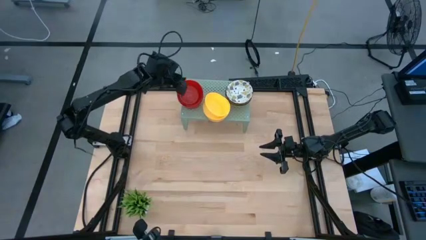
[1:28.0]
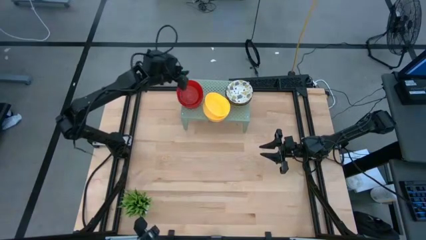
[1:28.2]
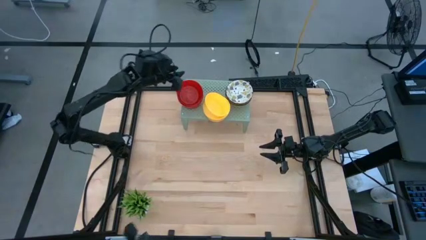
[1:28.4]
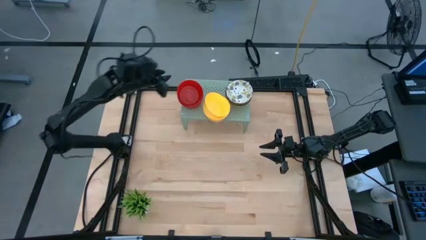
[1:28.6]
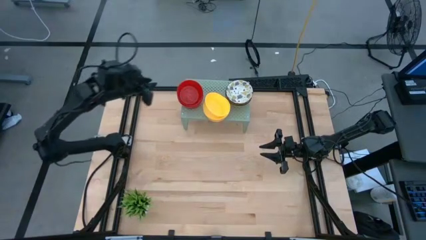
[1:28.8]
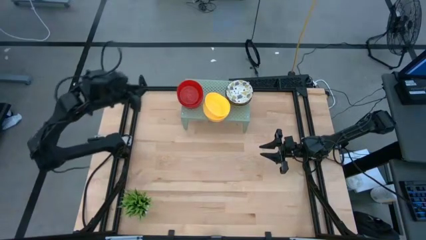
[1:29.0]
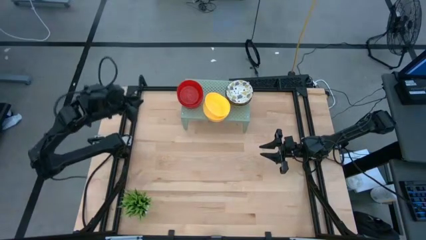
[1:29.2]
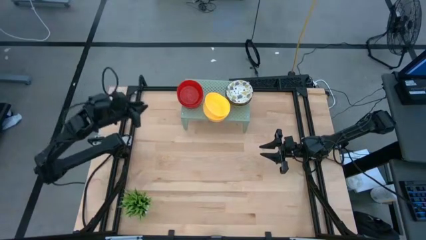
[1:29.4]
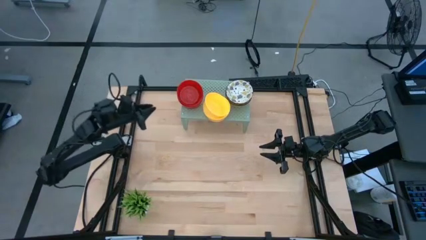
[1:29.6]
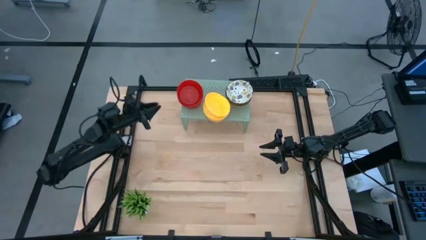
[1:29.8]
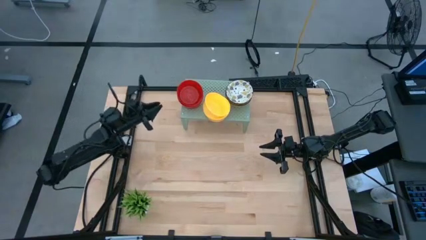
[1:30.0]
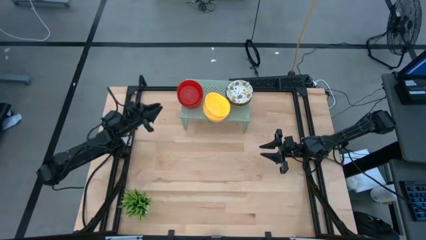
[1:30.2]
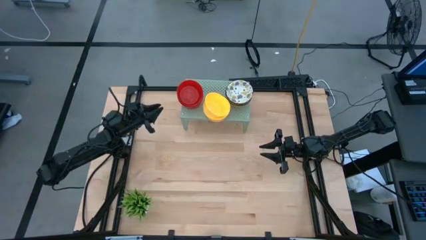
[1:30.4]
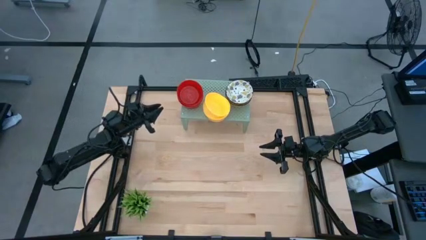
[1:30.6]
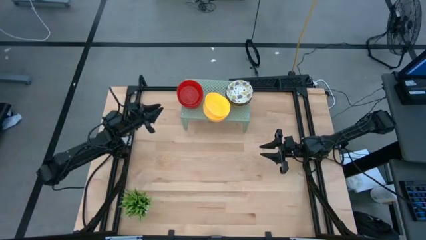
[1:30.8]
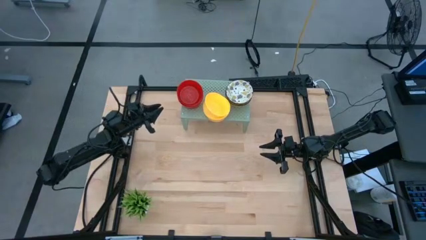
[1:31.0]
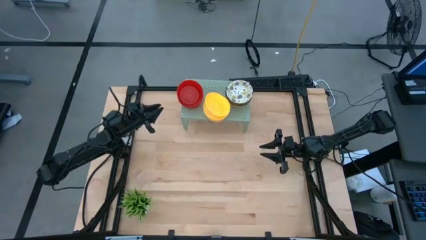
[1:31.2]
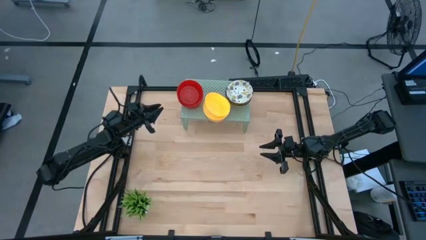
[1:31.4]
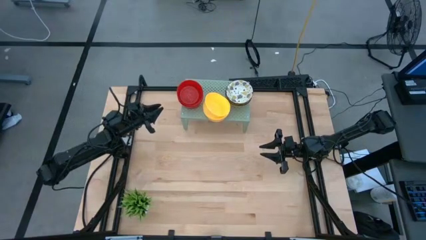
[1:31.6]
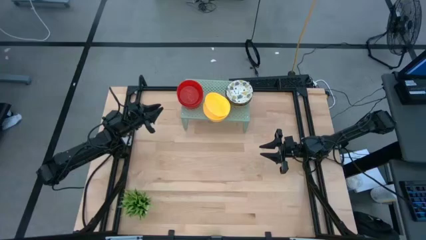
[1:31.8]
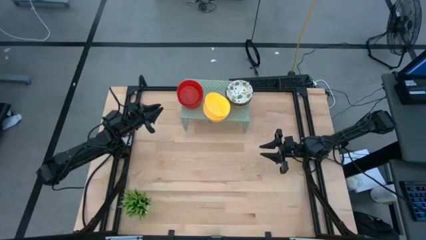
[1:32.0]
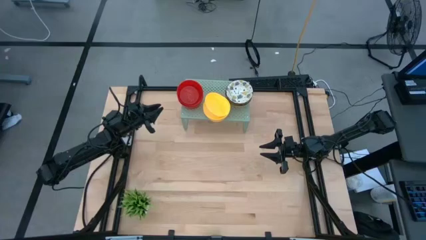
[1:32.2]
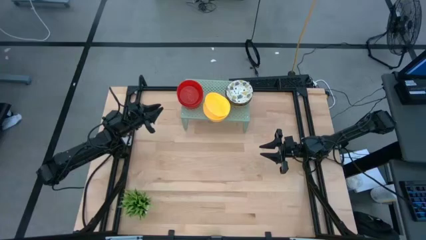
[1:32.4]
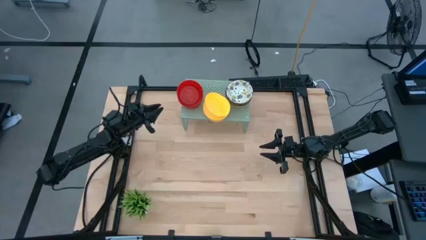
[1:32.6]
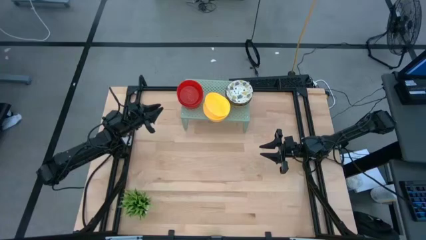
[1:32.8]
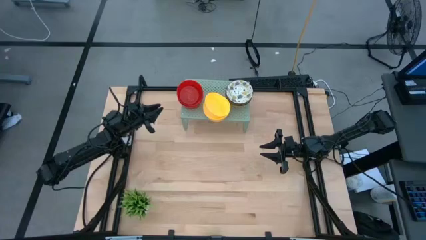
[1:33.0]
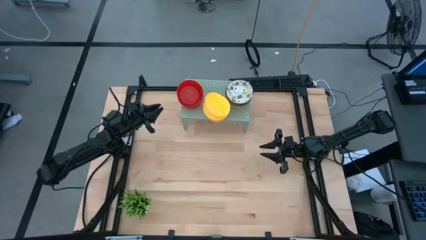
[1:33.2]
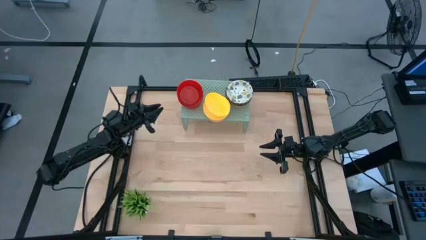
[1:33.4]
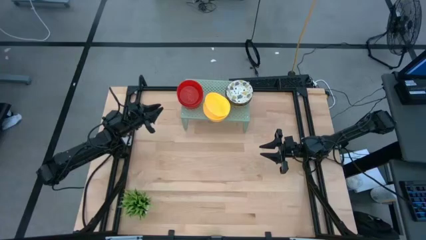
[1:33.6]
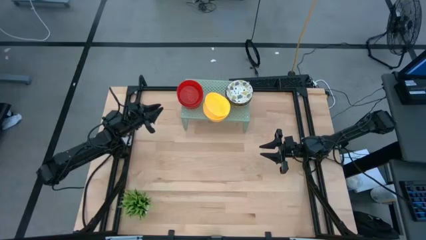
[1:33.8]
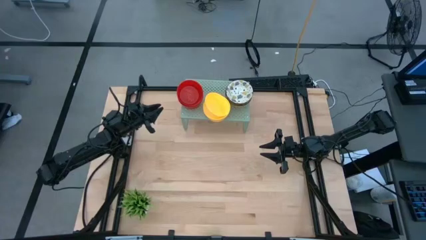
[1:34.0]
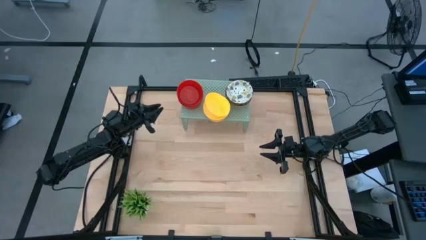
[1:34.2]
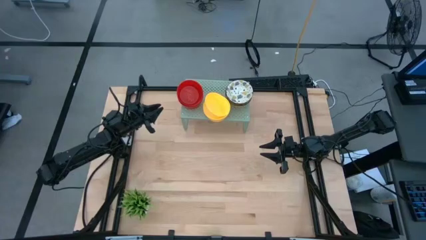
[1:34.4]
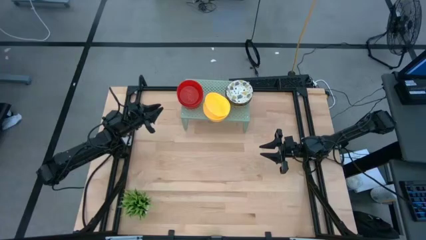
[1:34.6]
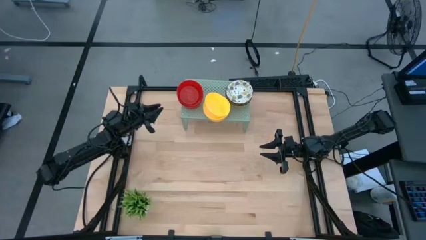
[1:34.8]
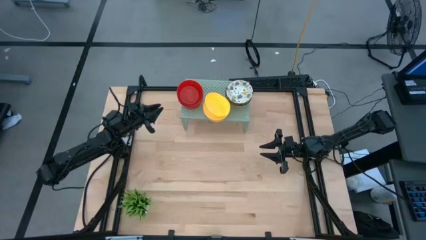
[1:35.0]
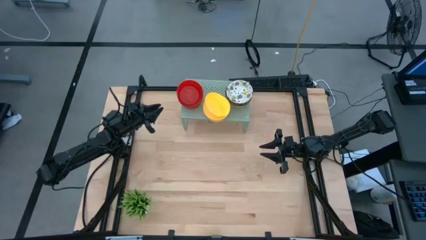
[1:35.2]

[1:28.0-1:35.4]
Task: Pick & Place Mini bowls
Return to Home Position

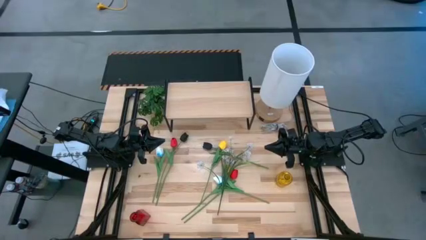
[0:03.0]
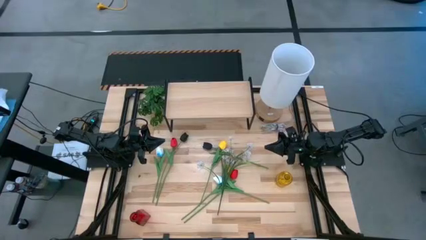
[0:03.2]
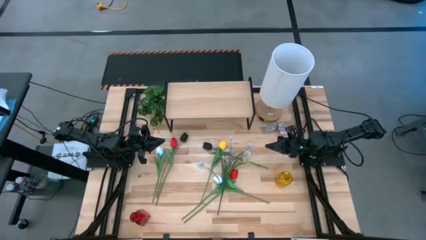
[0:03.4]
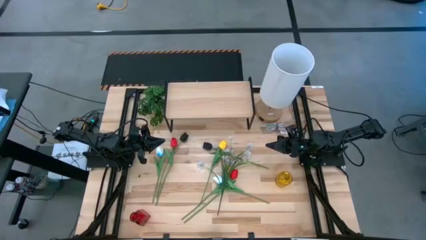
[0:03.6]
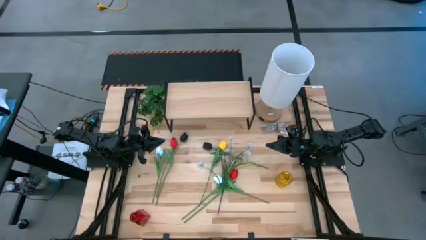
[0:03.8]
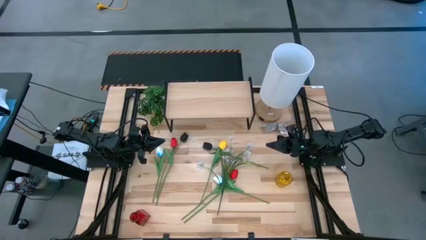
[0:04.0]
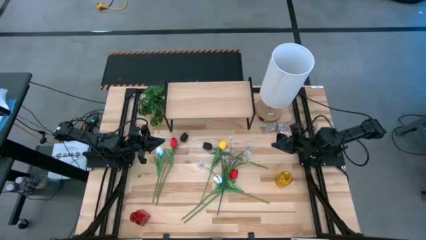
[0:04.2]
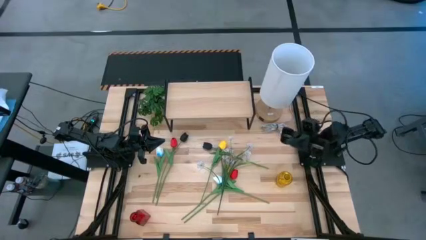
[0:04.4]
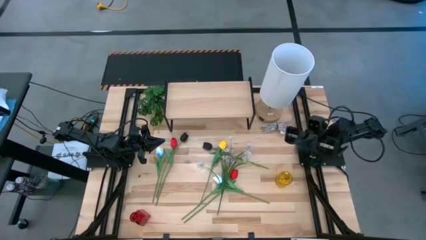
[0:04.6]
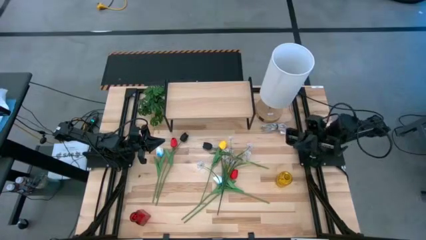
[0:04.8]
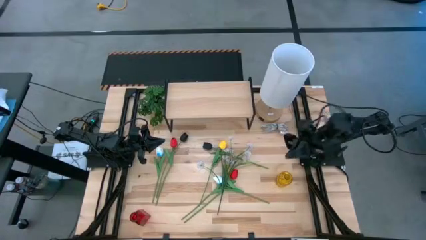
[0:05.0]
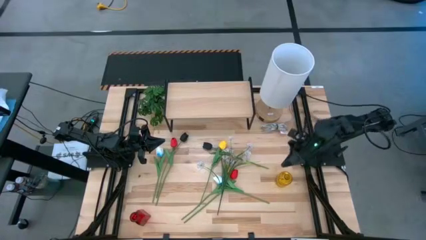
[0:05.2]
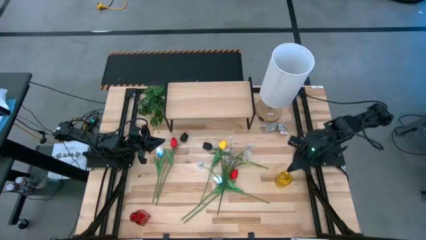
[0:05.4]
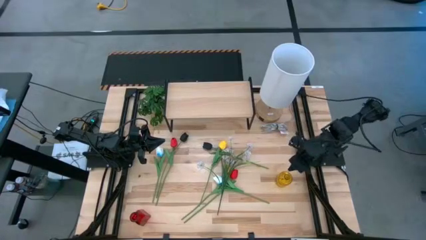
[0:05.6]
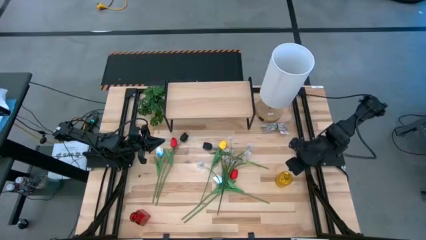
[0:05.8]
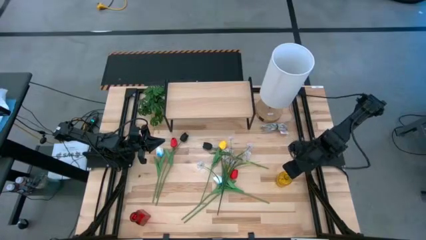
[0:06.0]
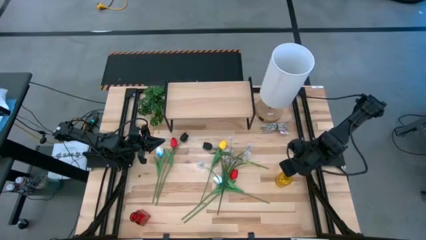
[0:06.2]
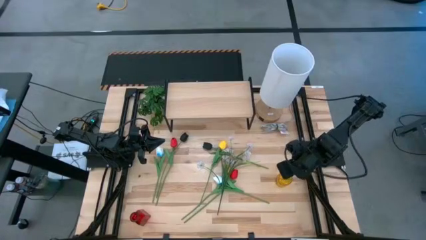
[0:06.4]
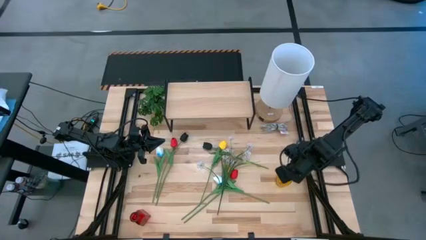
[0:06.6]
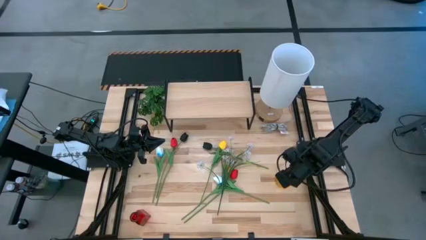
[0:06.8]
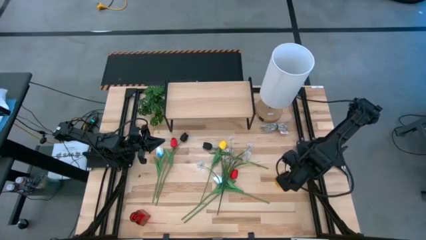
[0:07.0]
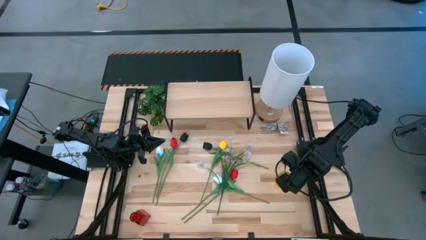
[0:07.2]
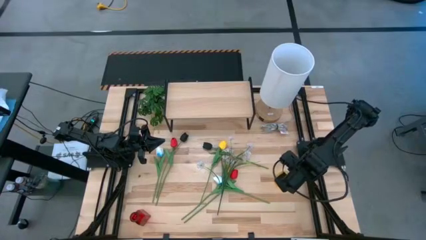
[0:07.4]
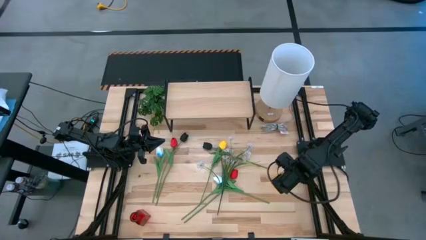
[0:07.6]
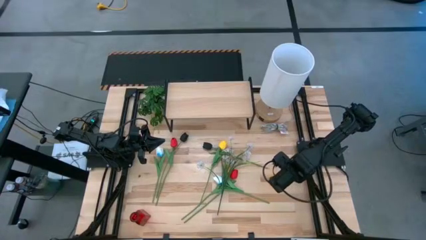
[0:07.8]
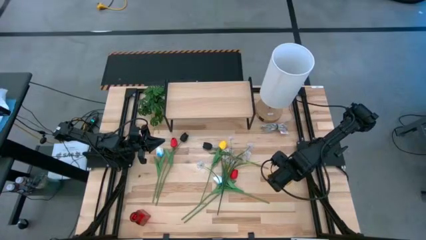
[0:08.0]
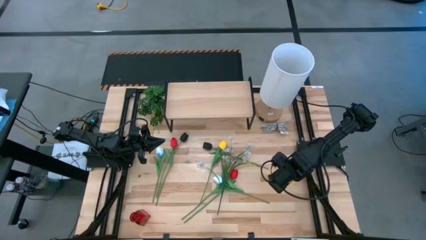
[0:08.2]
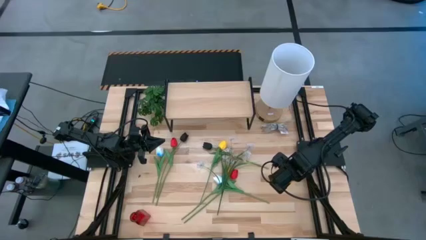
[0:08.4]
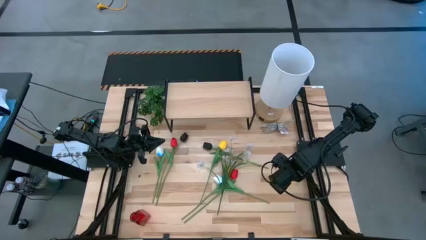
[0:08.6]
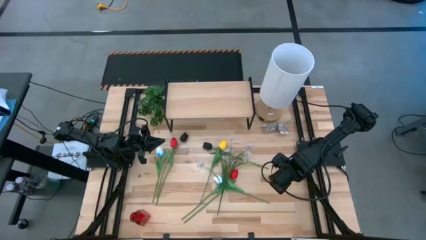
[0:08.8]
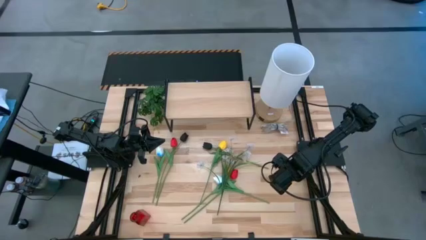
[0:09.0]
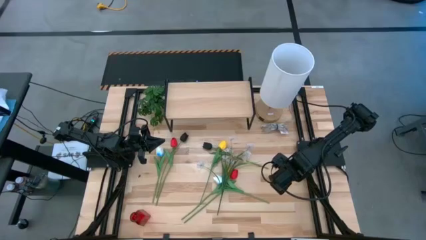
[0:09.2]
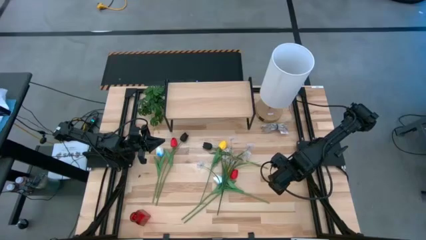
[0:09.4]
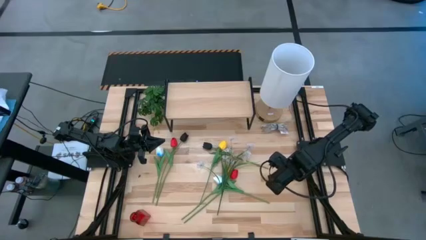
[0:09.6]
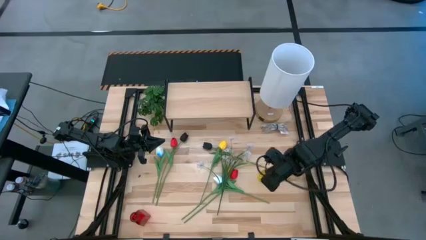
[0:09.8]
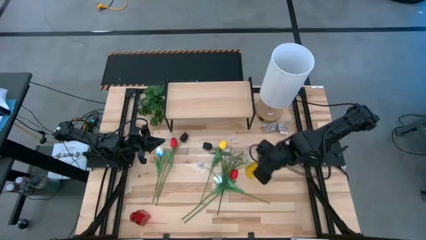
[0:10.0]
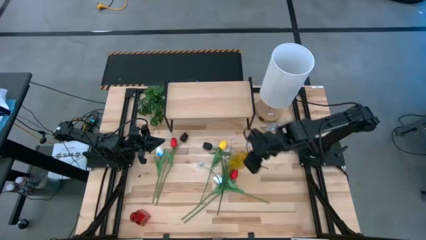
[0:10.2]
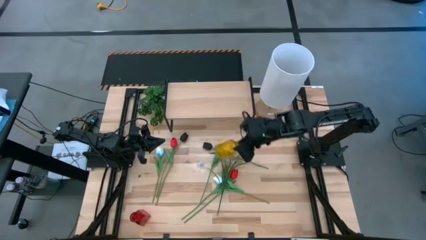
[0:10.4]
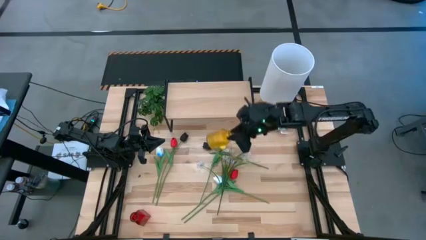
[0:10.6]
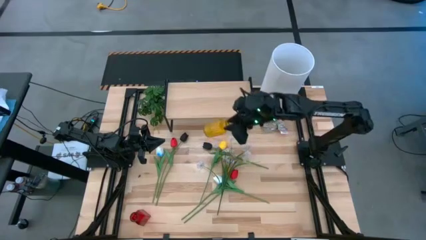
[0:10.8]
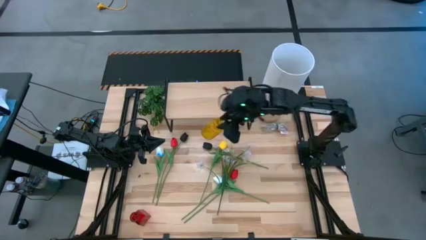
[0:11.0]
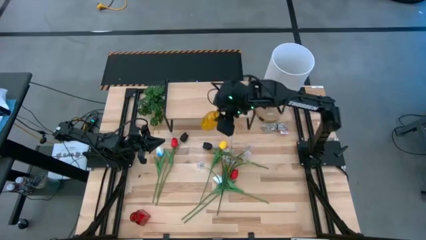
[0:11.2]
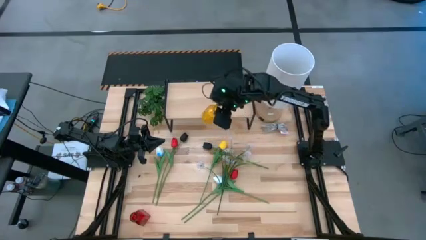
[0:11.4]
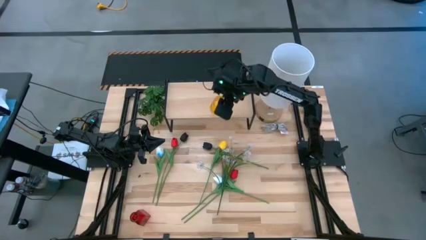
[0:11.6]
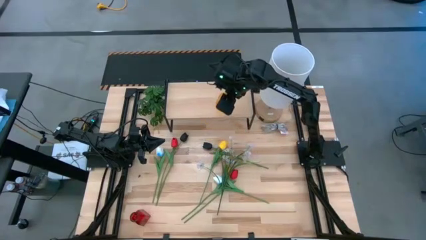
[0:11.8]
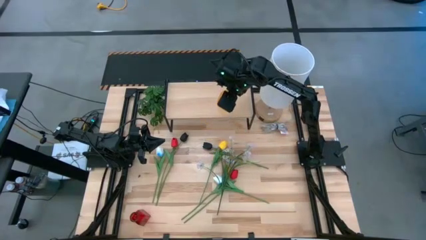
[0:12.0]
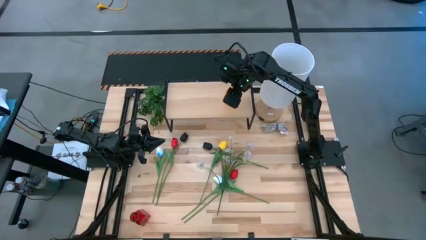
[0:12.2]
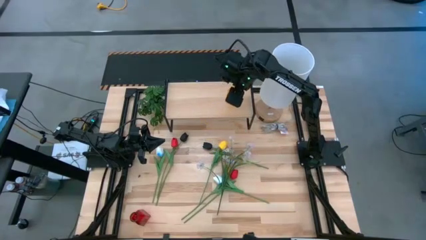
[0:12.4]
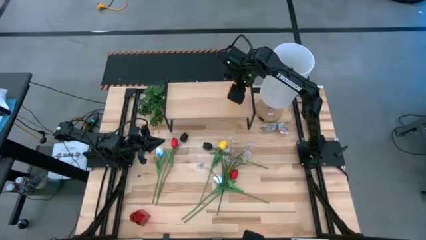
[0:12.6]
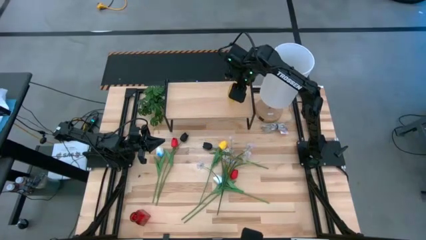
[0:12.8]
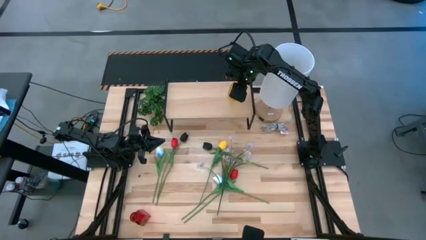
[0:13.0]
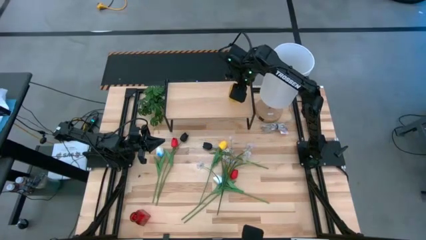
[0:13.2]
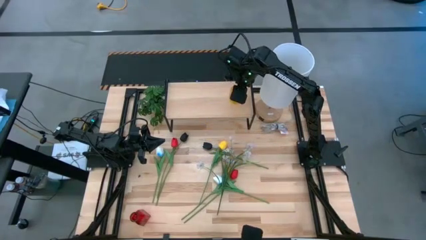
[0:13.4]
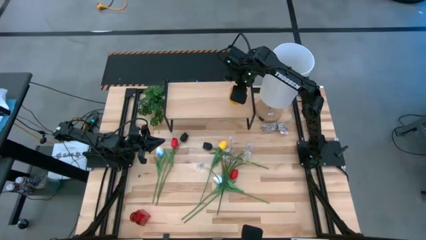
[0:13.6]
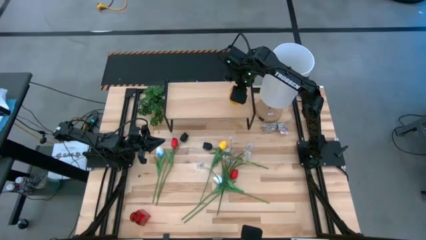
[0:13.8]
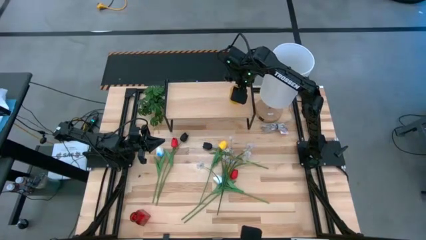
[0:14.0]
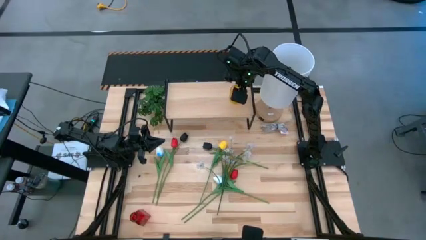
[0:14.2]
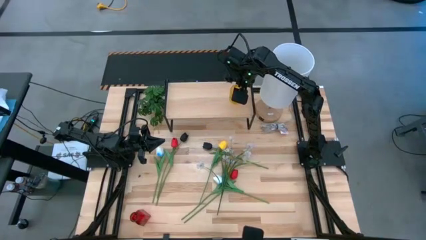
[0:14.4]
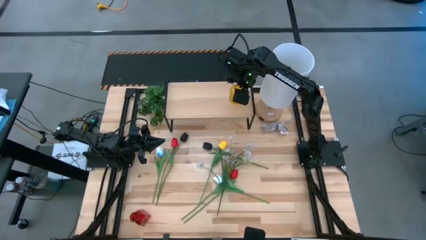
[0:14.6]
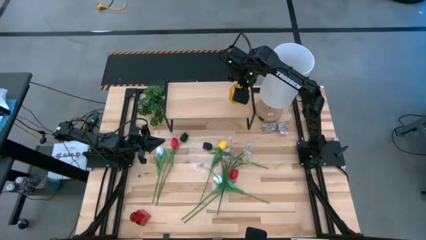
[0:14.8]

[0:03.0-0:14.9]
Task: Pick and place flowers into a vace then onto a shelf
Put the yellow vase on the shelf
